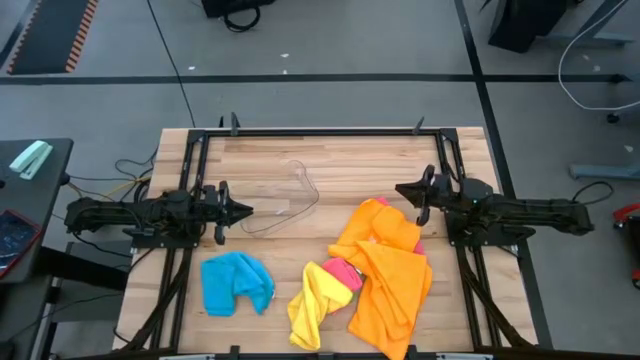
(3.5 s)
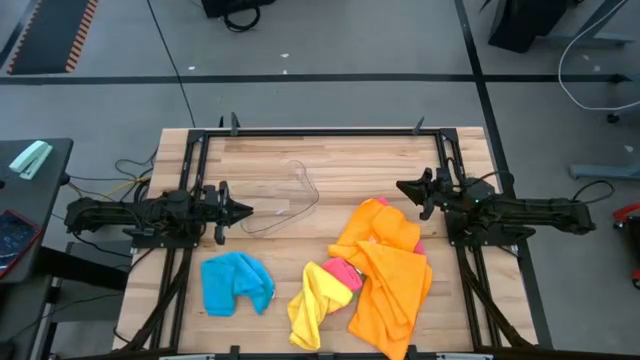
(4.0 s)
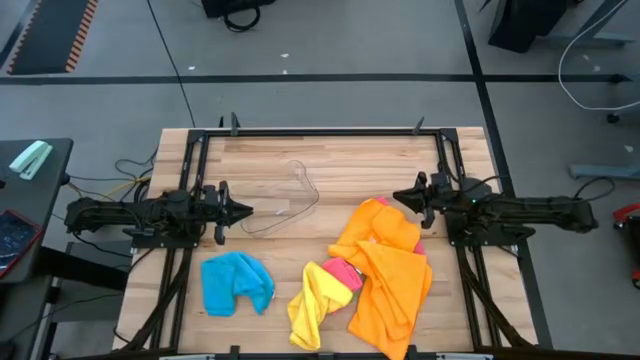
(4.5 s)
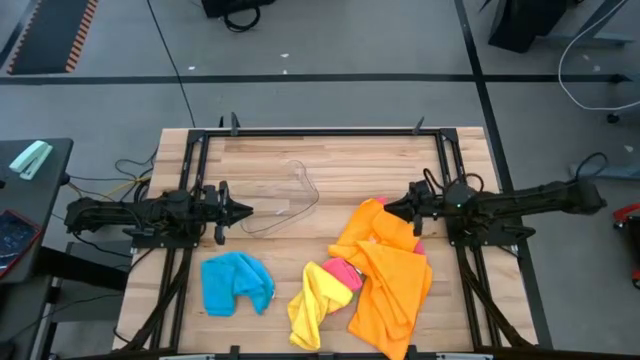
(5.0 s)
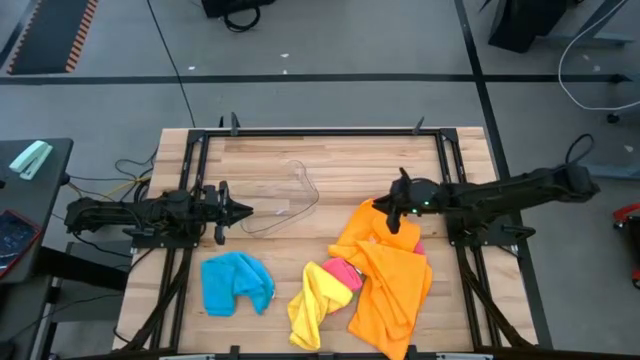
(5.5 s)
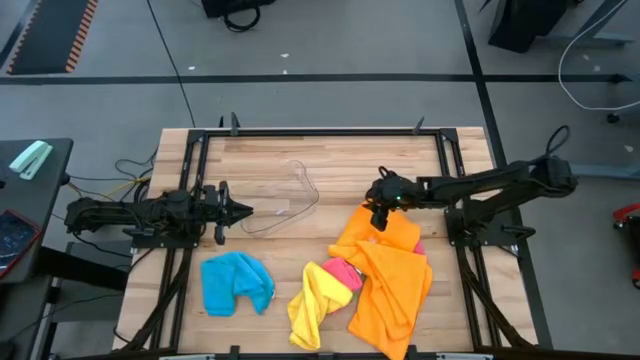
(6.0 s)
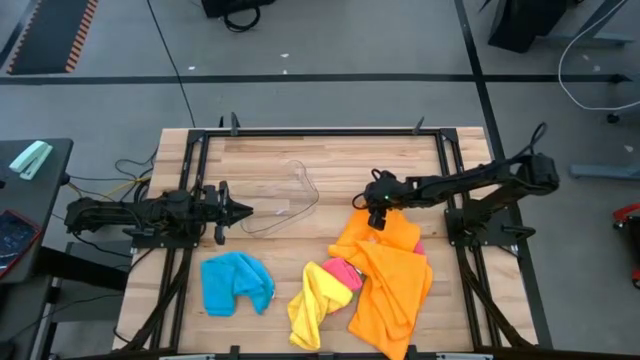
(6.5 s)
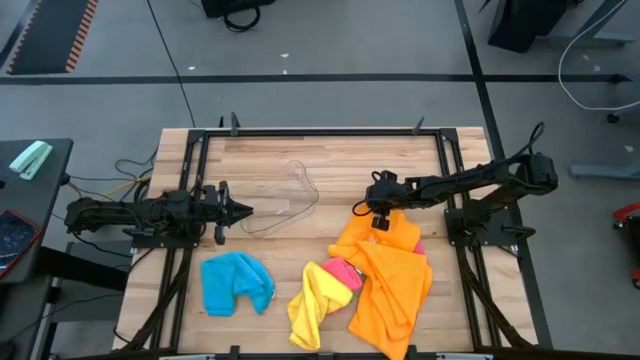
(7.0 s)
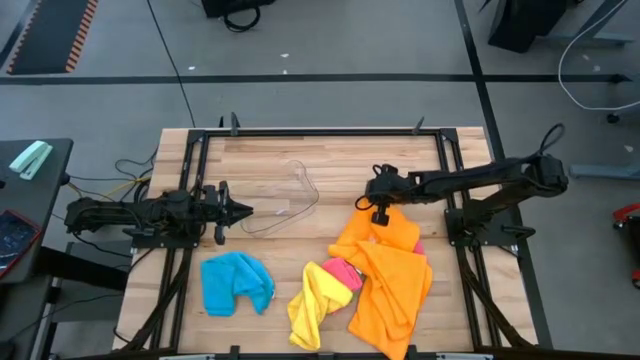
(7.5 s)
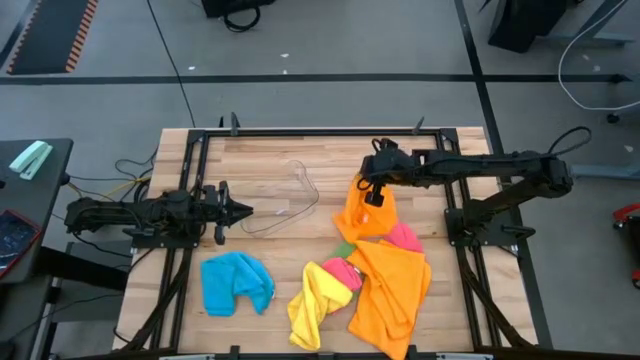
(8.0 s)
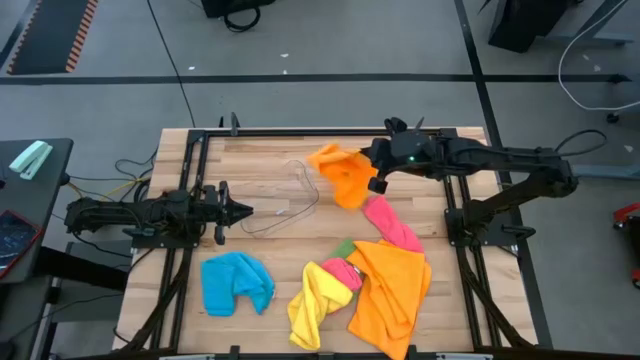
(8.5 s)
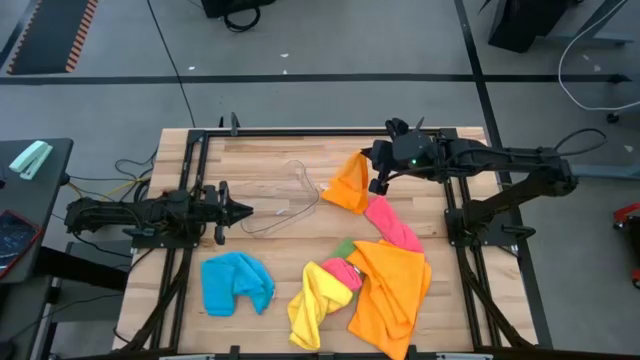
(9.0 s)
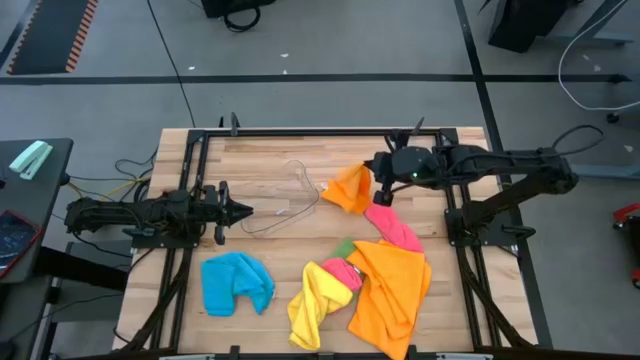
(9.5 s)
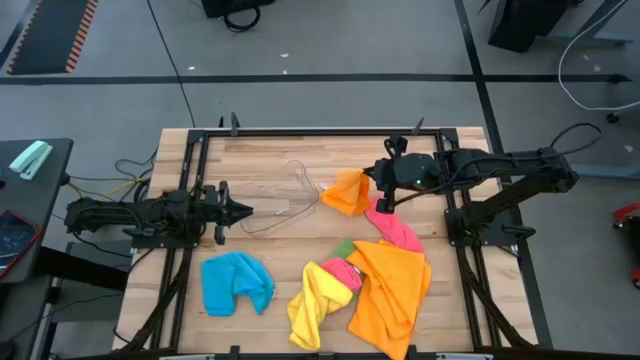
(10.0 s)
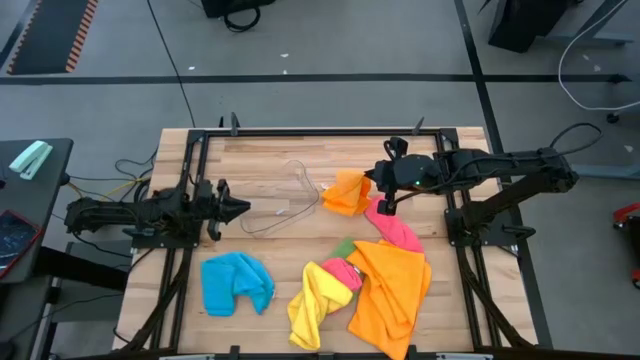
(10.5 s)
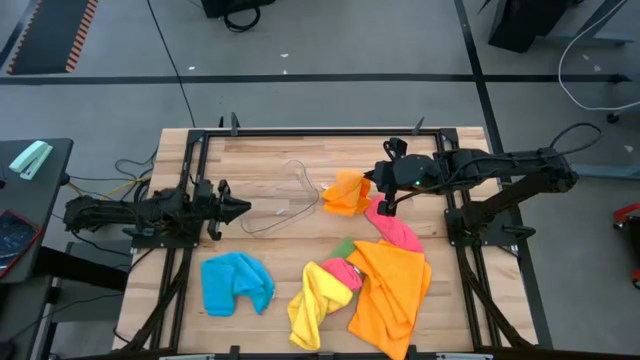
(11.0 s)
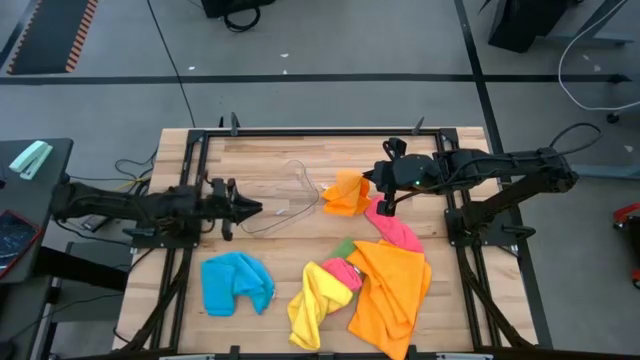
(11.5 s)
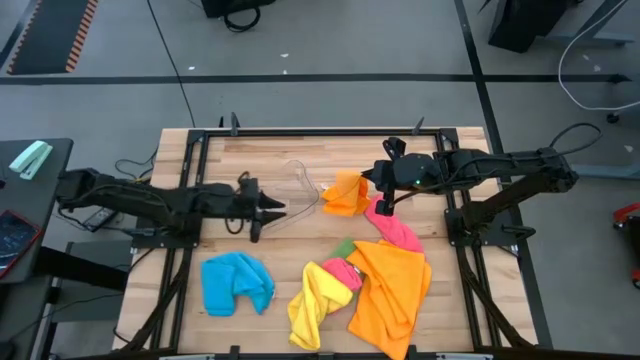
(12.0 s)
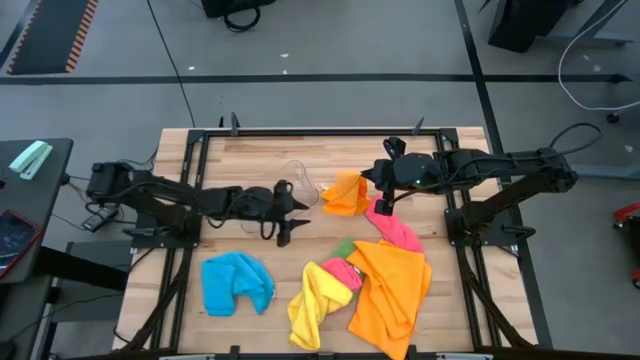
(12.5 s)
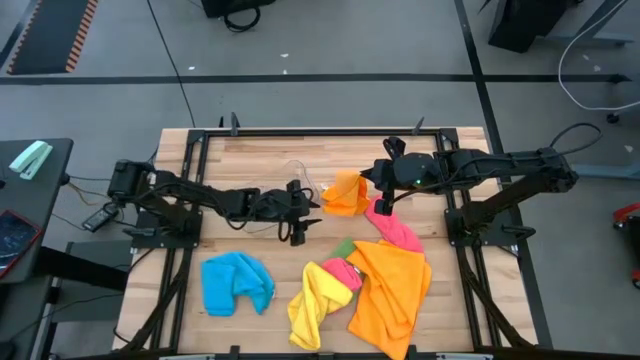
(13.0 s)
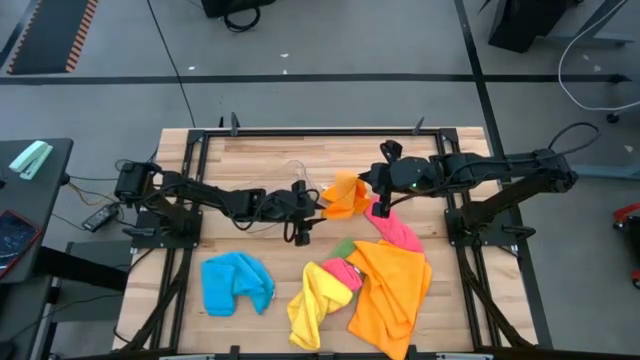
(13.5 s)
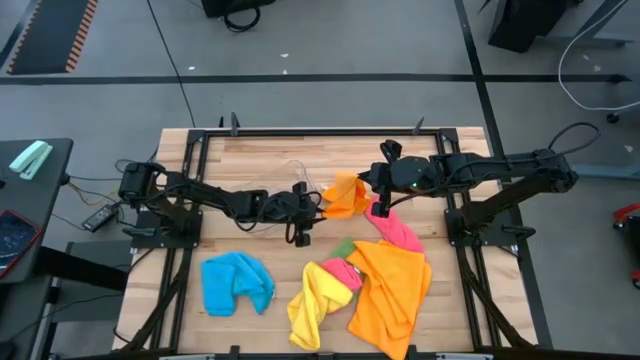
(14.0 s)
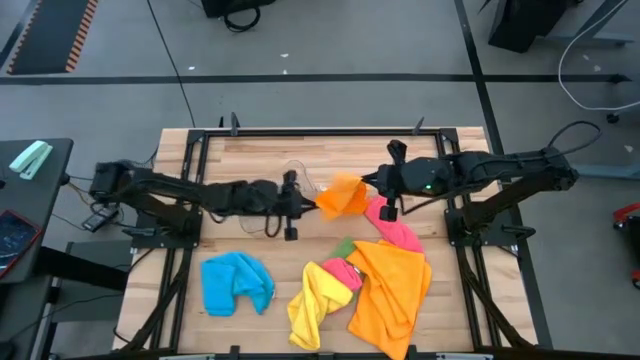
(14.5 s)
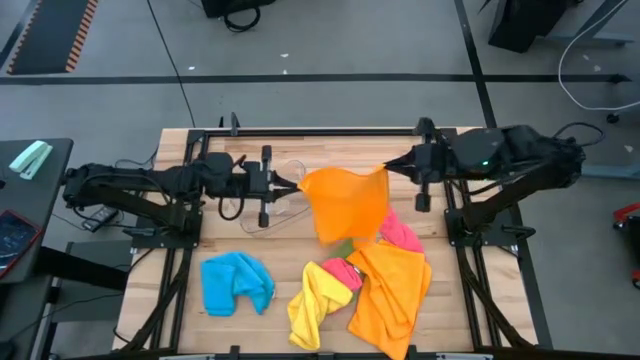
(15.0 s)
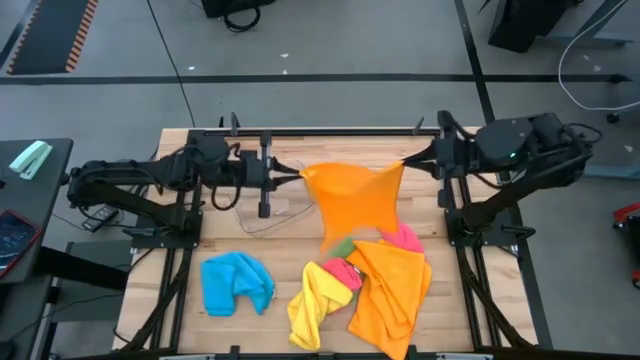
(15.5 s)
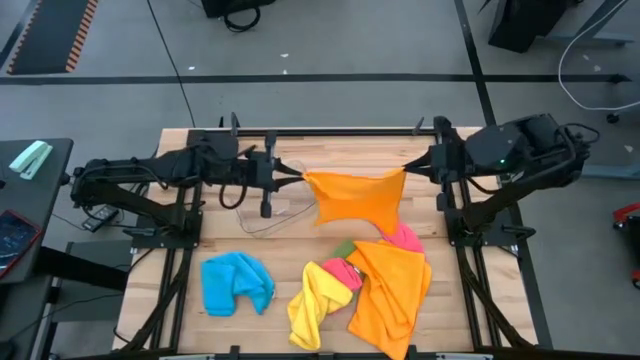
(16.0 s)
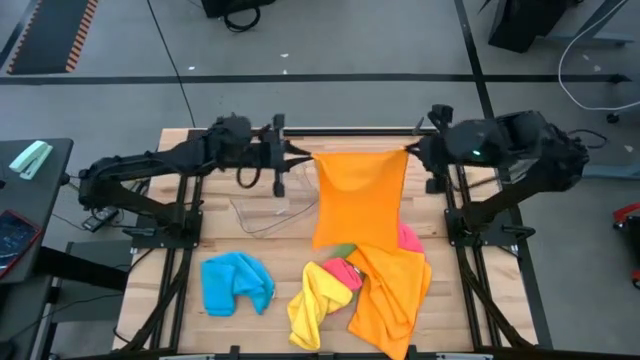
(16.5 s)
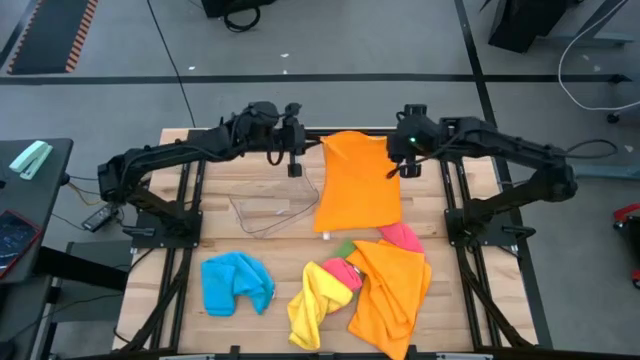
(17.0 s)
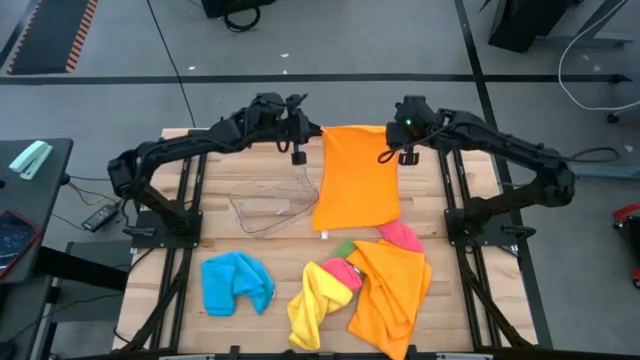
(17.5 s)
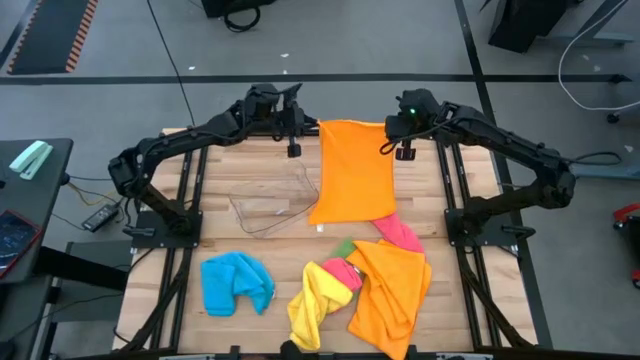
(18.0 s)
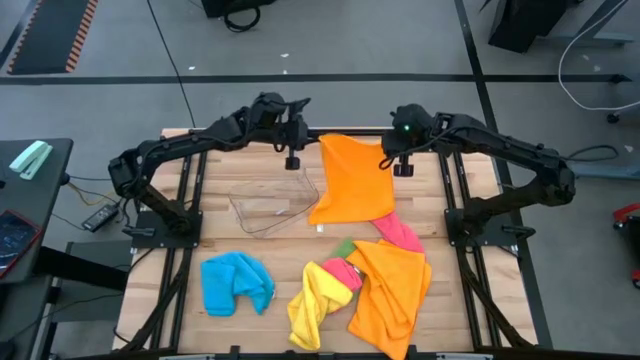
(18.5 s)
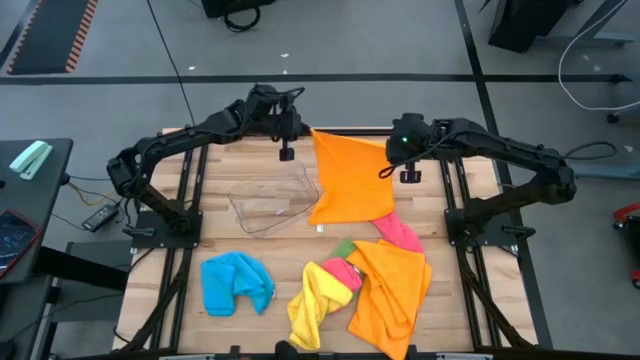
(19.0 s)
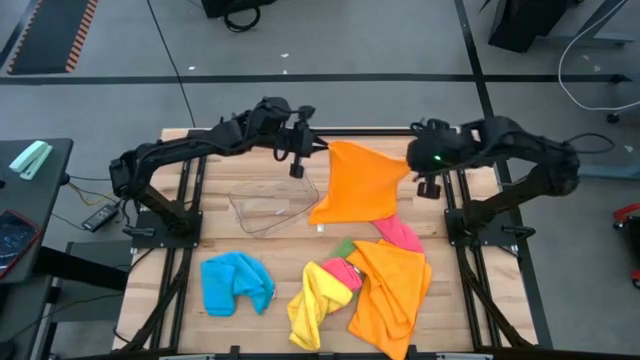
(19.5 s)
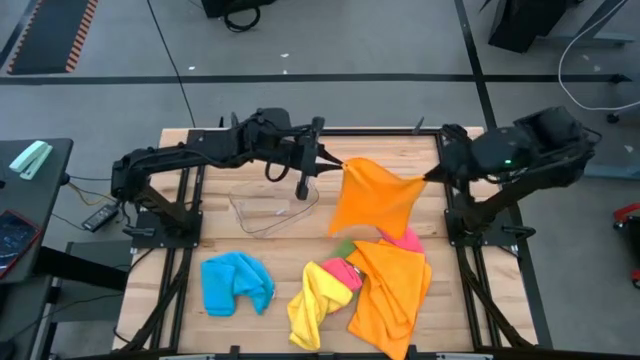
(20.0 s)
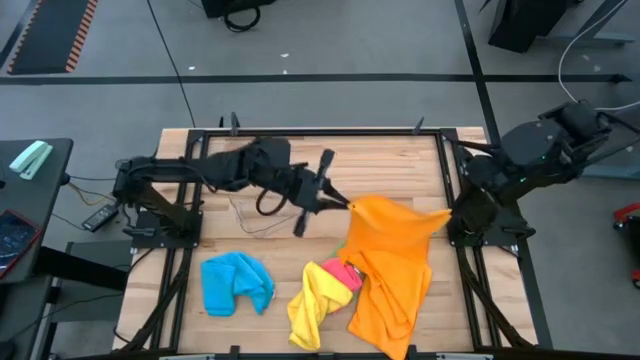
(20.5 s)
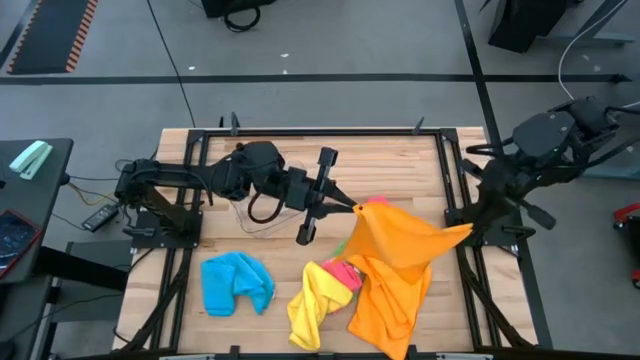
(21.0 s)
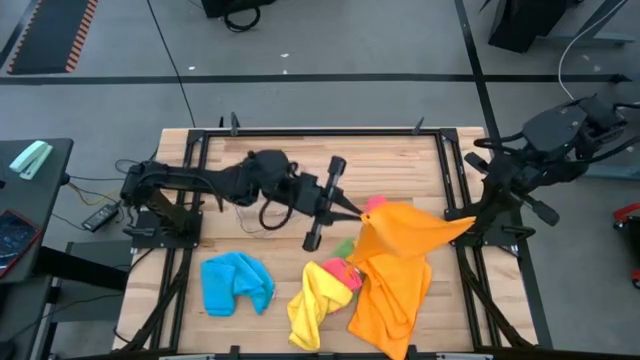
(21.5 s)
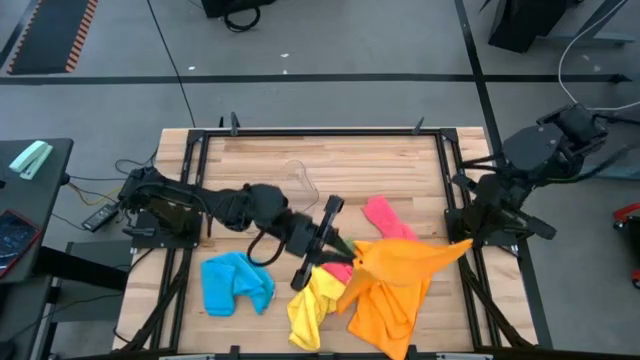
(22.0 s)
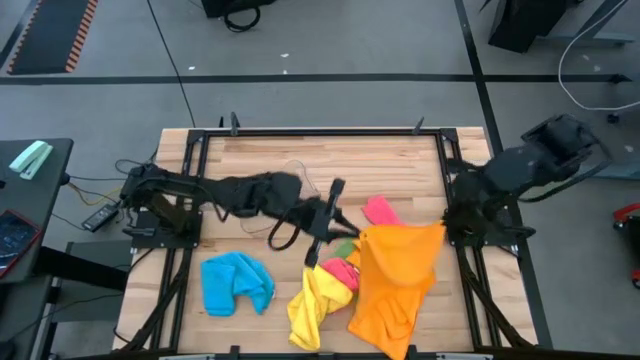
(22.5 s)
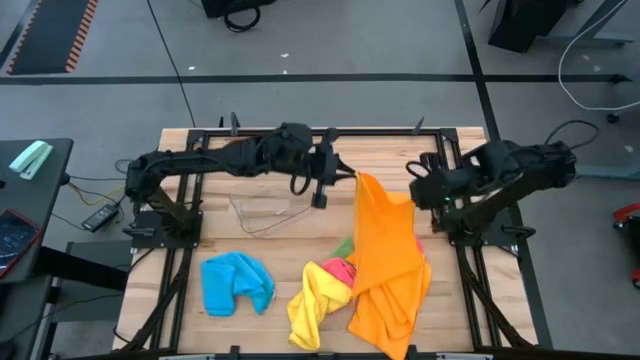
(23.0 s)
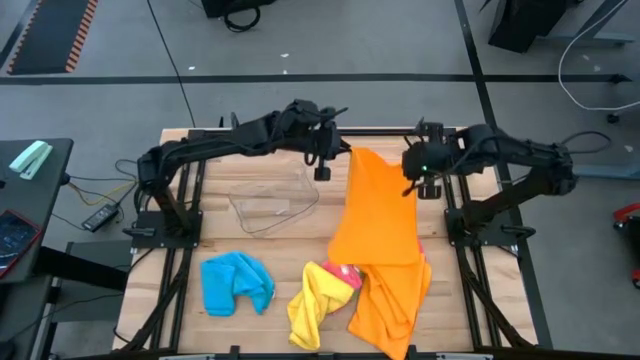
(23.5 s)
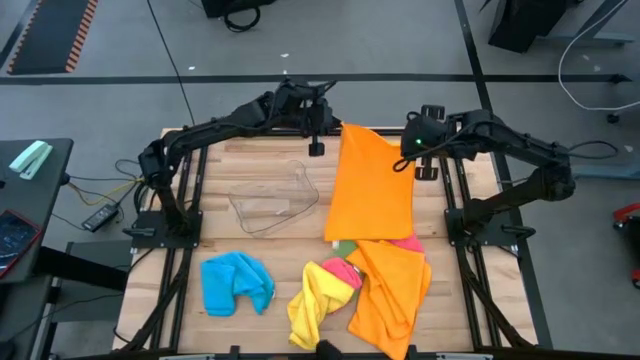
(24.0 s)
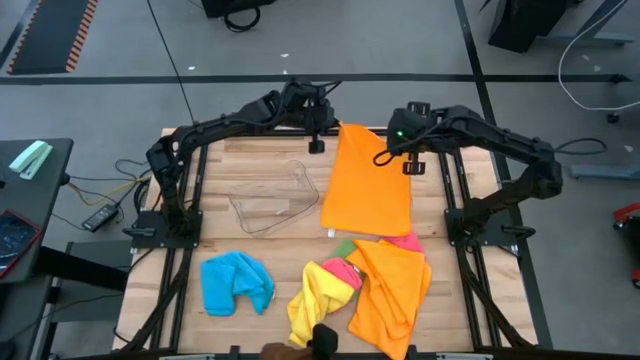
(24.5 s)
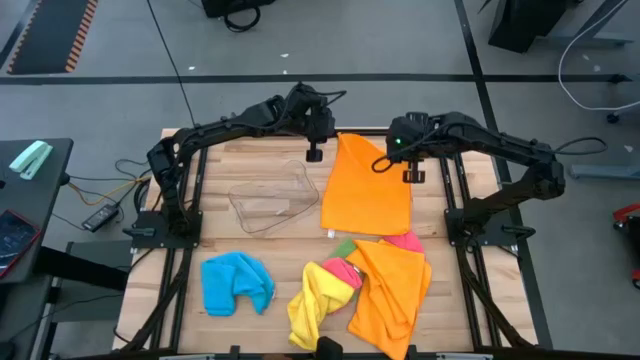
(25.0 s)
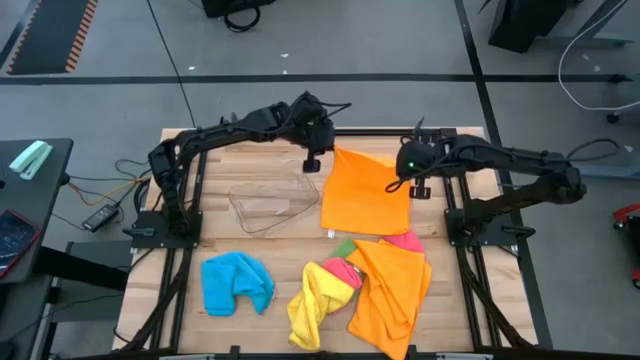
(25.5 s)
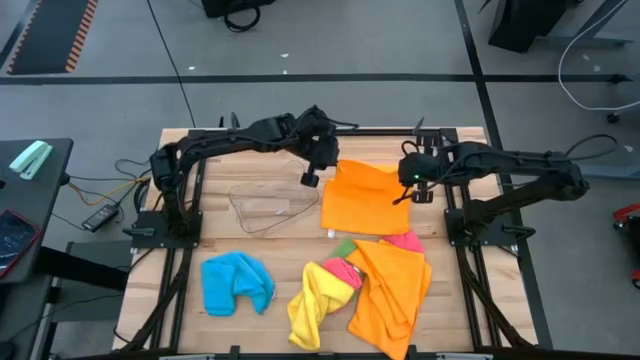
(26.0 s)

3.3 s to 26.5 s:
Task: Fold microfiber towels
Fold the orange microfiber towel
